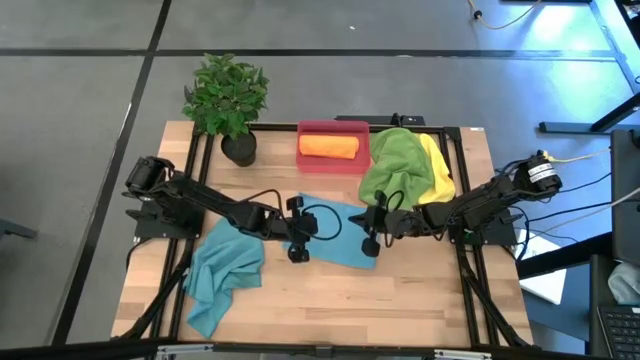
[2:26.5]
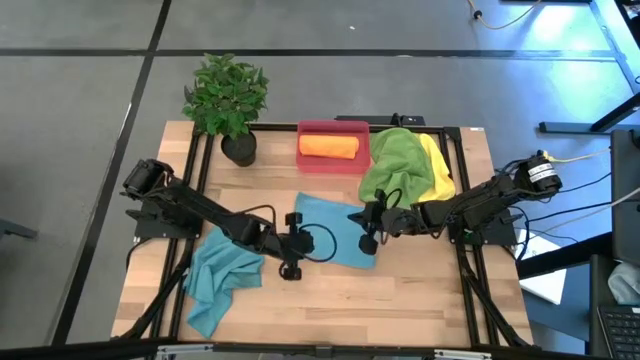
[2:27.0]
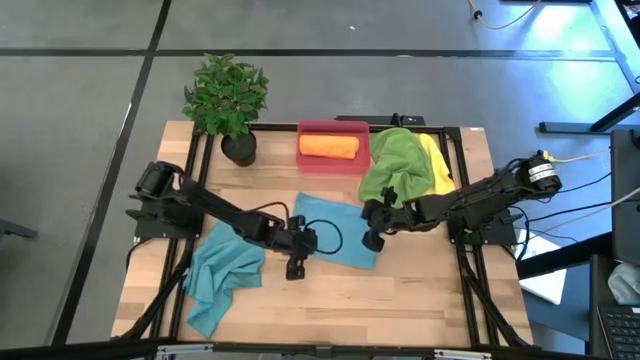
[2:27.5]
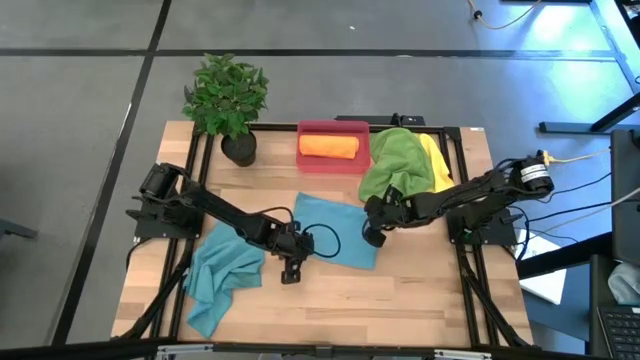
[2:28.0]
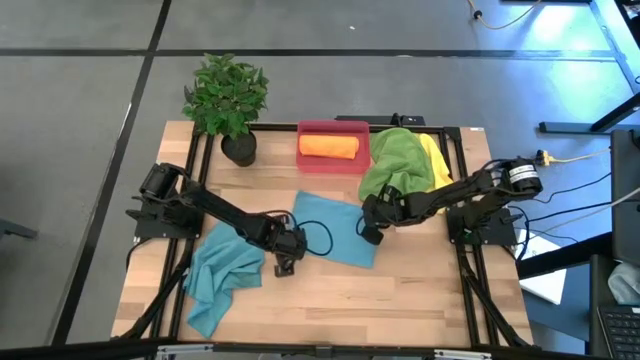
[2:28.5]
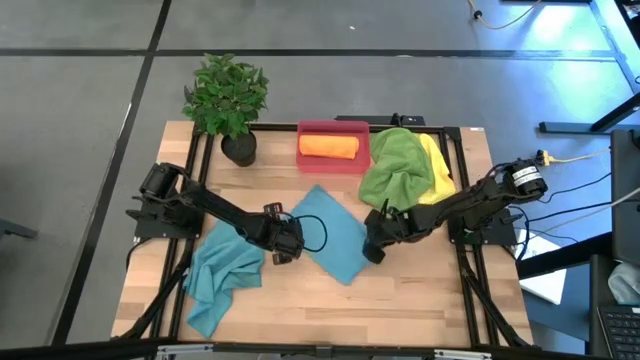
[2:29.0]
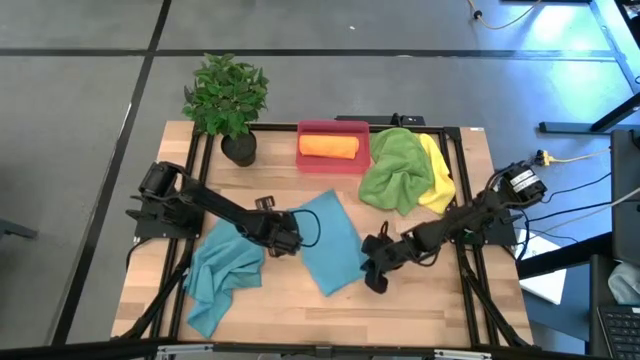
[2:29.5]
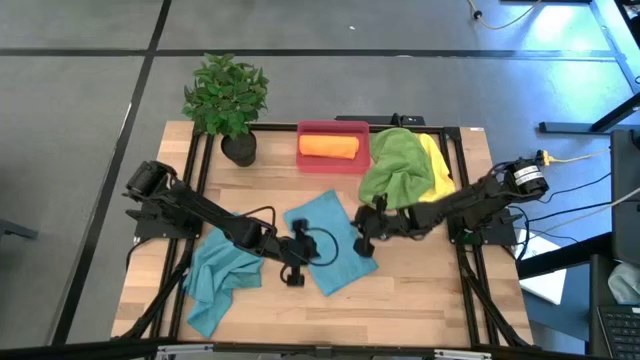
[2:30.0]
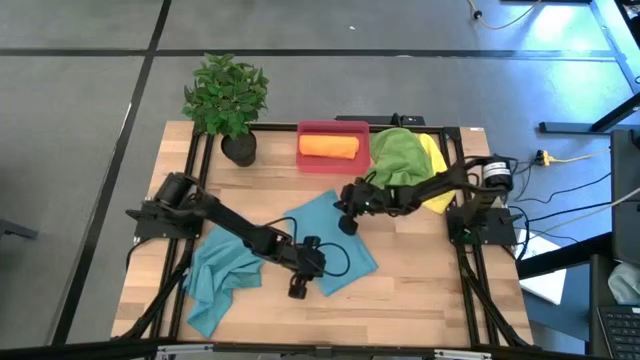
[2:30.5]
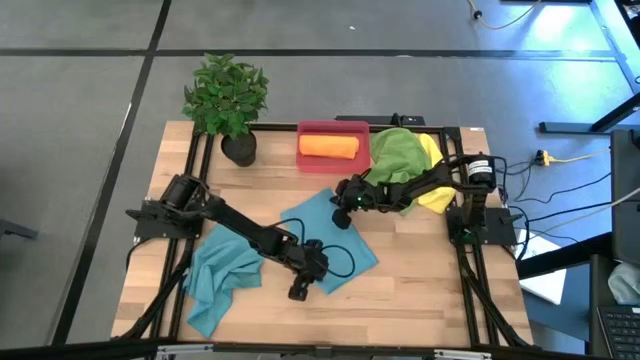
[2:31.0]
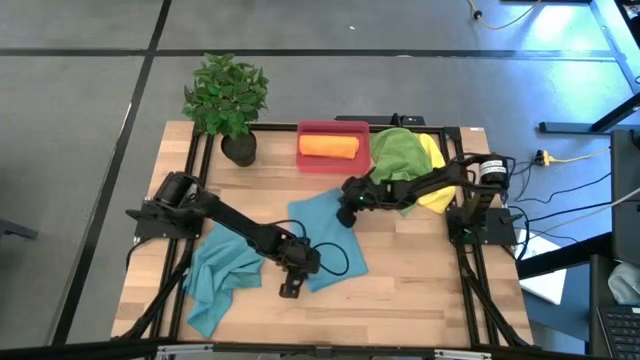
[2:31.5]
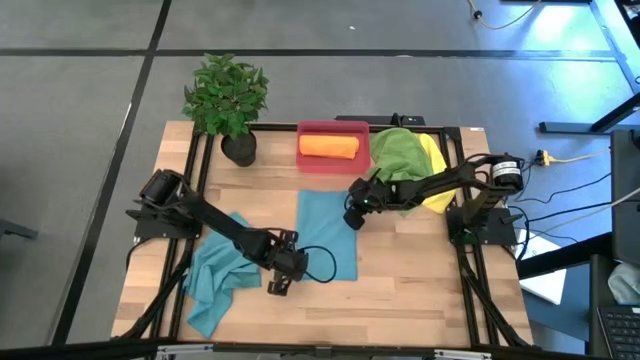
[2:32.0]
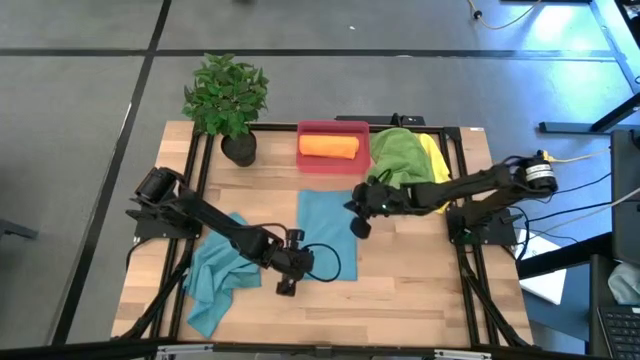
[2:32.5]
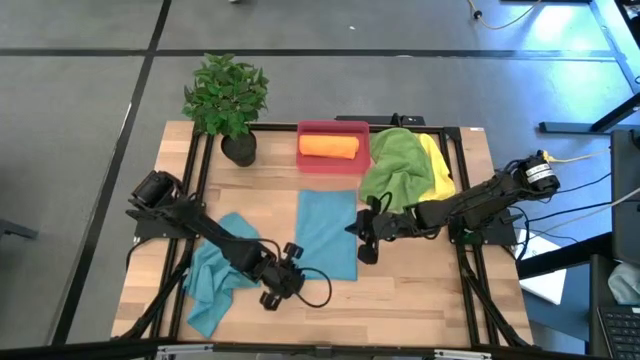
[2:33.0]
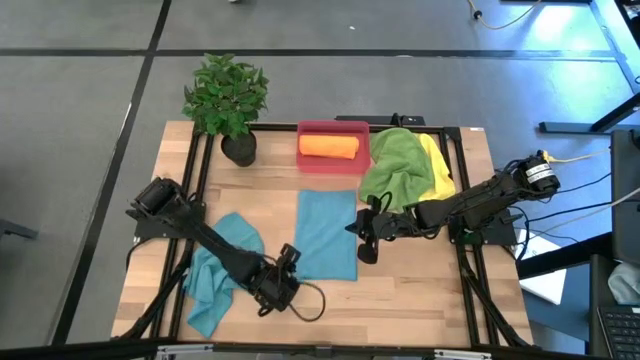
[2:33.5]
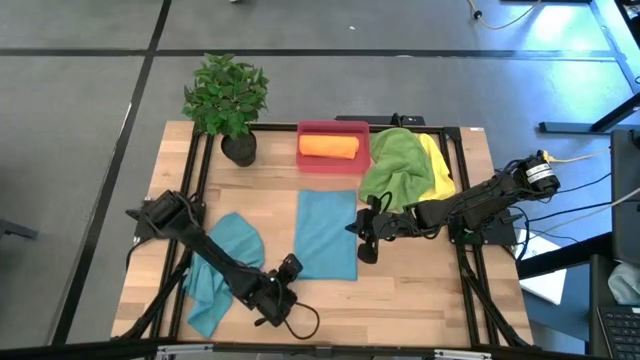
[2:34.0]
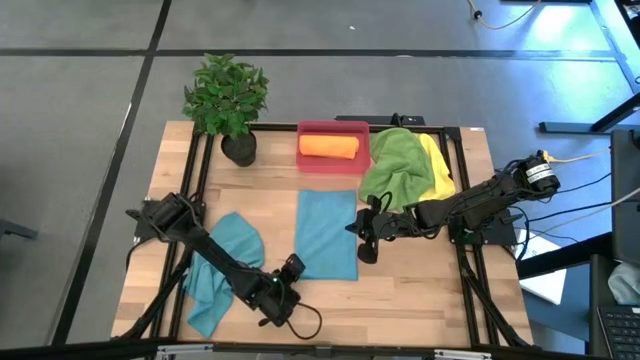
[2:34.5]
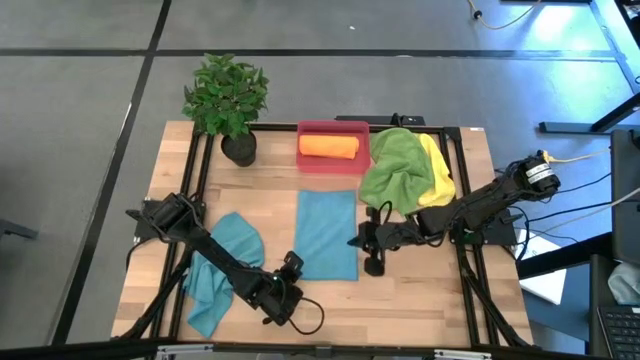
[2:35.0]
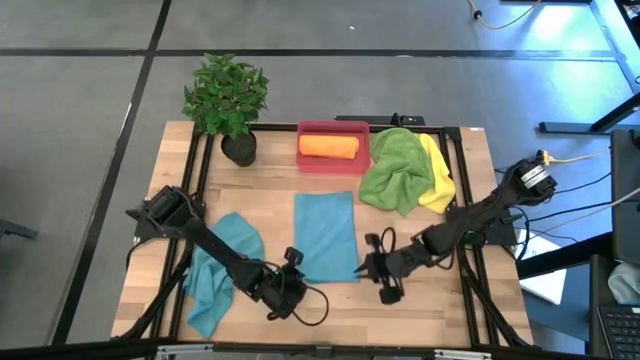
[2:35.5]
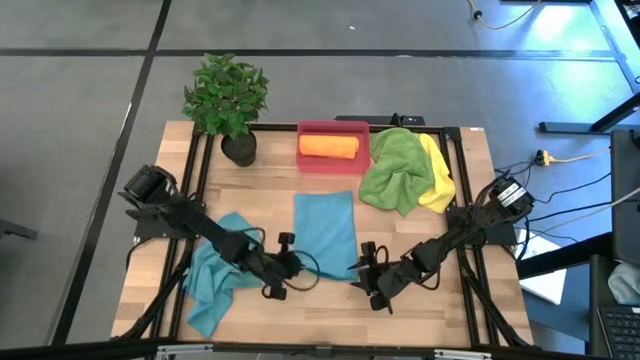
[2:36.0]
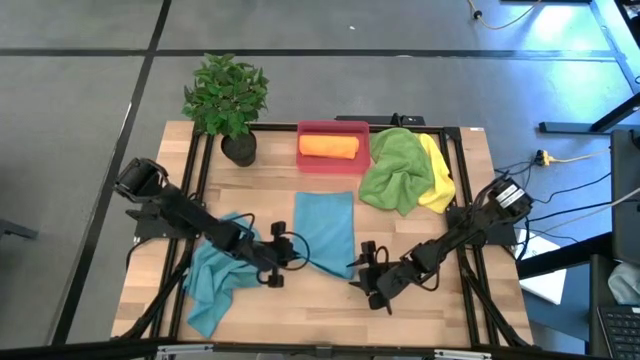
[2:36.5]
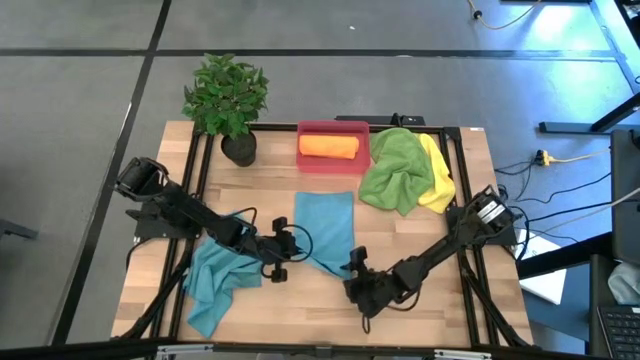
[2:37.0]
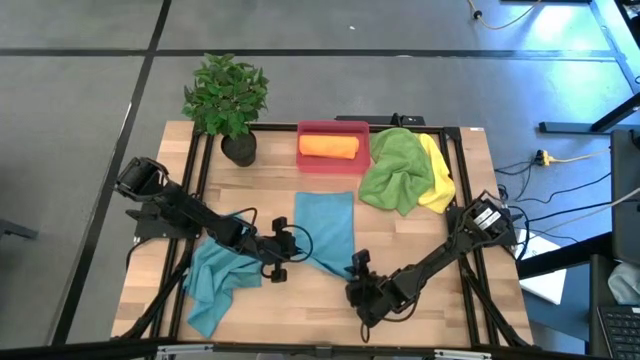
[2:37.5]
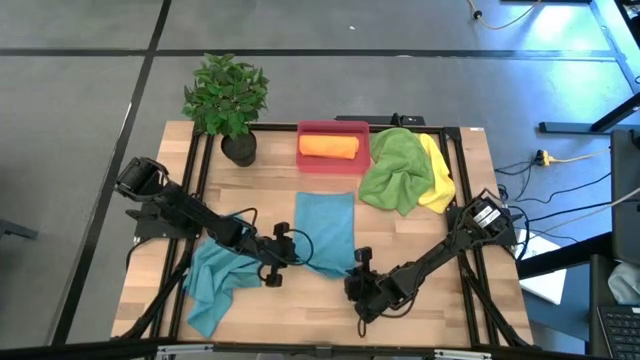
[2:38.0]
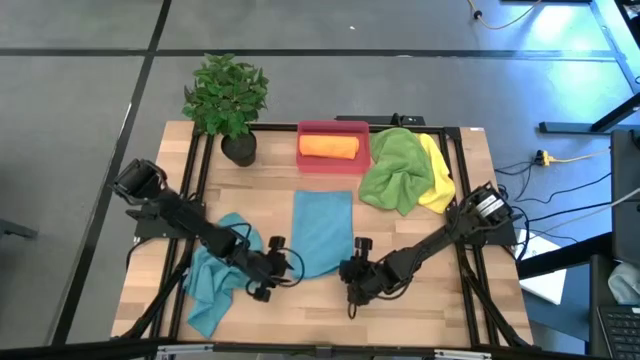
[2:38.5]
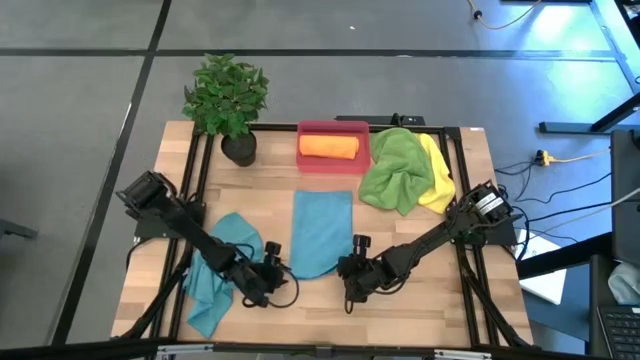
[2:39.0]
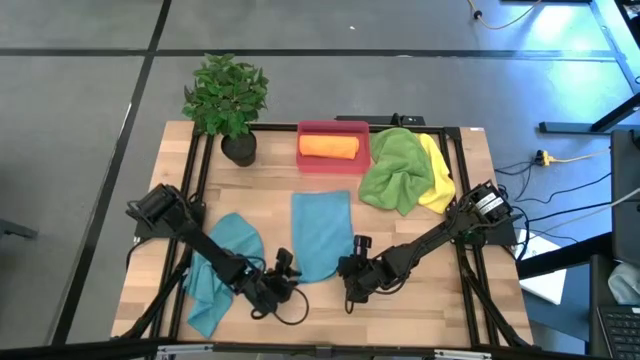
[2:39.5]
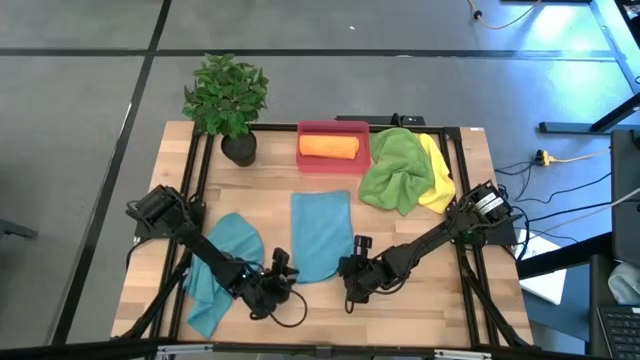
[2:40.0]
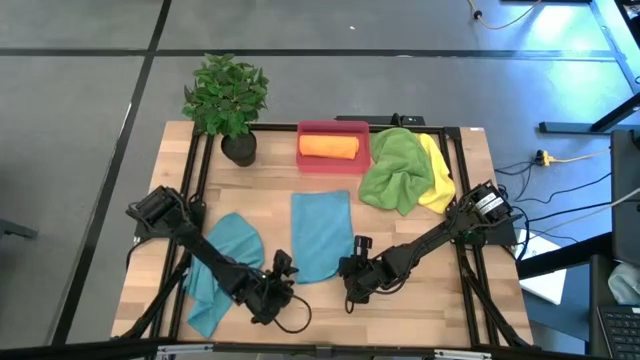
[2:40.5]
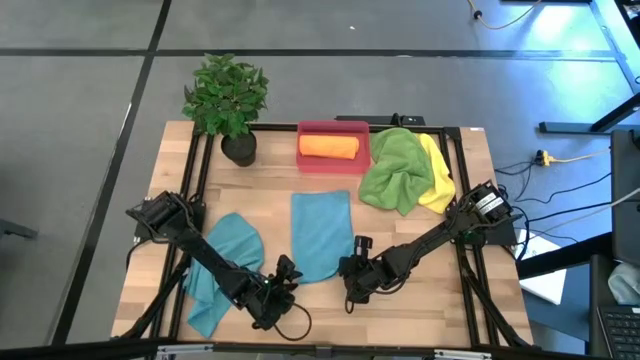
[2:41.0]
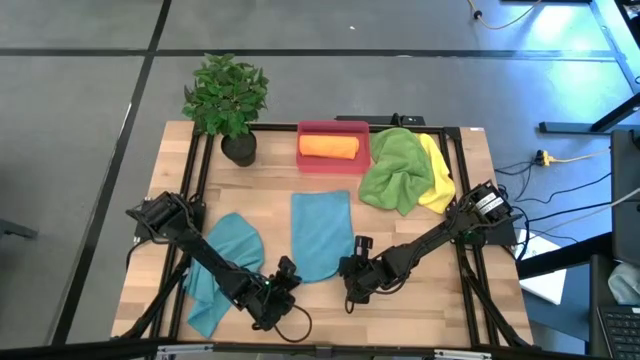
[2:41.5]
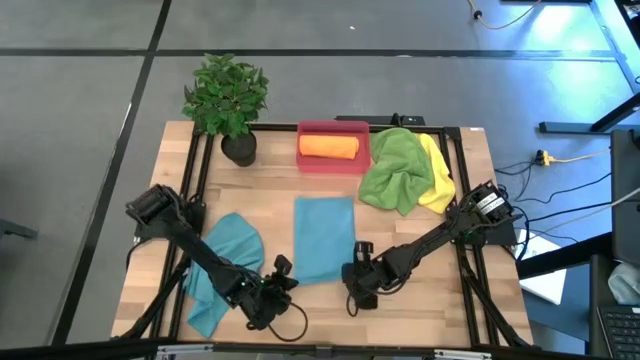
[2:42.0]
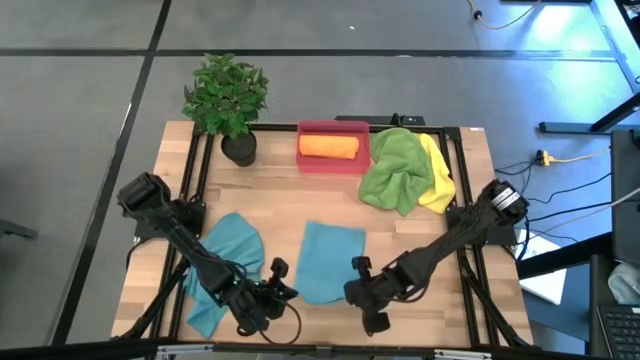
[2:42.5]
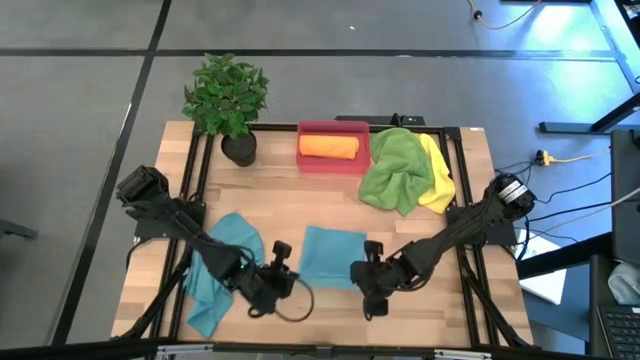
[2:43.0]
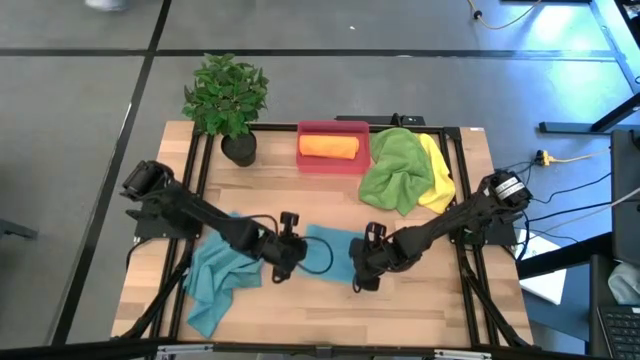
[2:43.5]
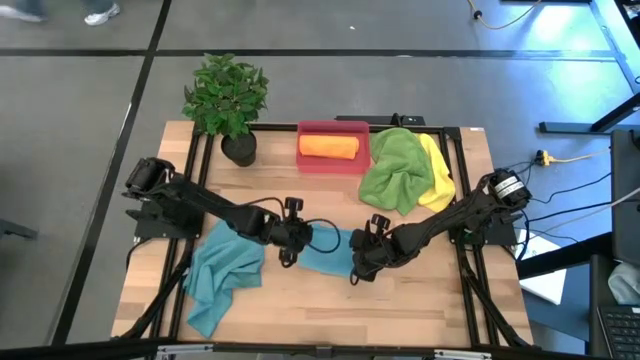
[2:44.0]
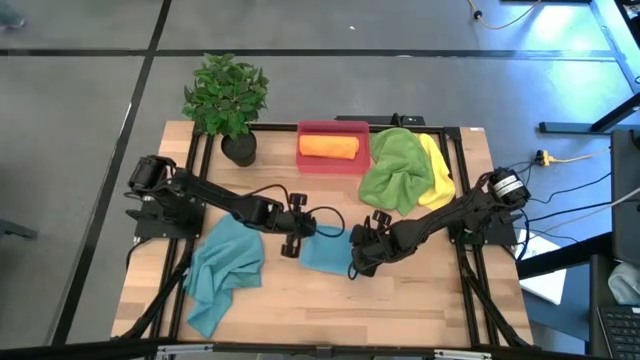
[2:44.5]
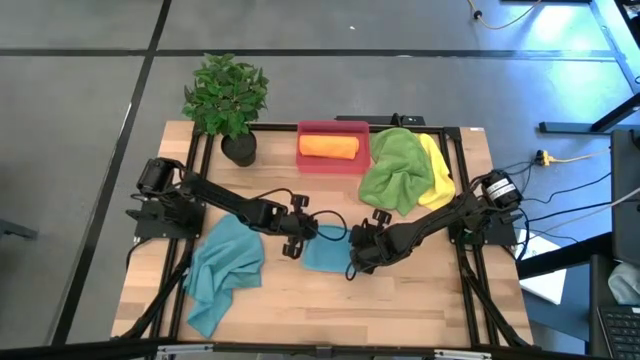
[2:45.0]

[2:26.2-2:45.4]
Task: Roll microfiber towels into tight, uniform cylinder then place into a basket
Fold the right blue towel

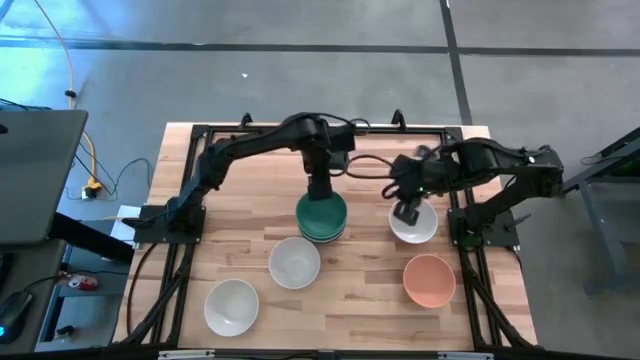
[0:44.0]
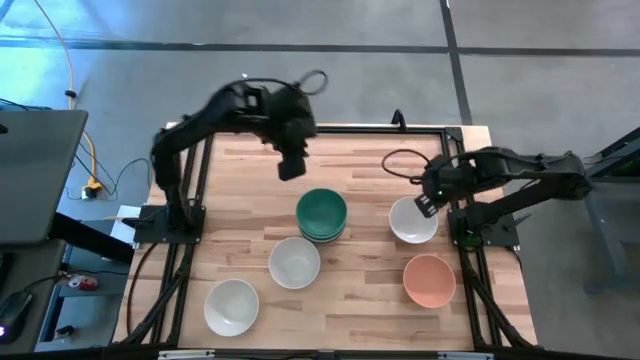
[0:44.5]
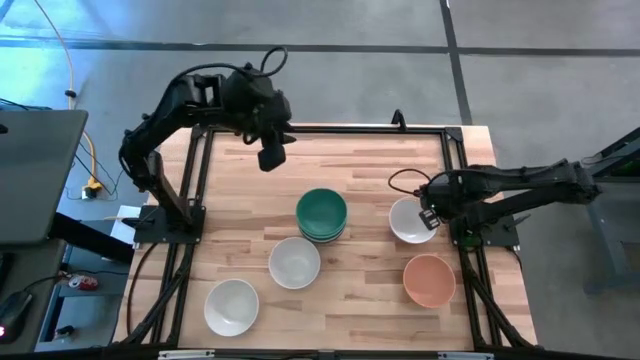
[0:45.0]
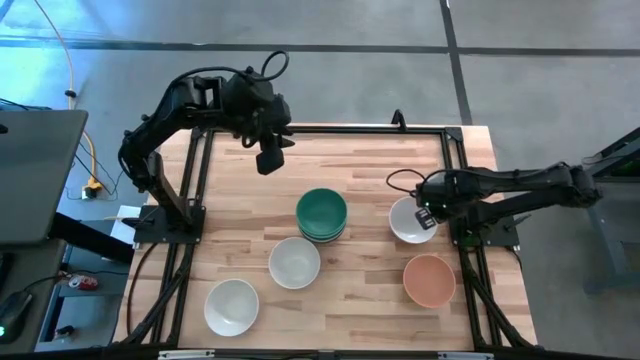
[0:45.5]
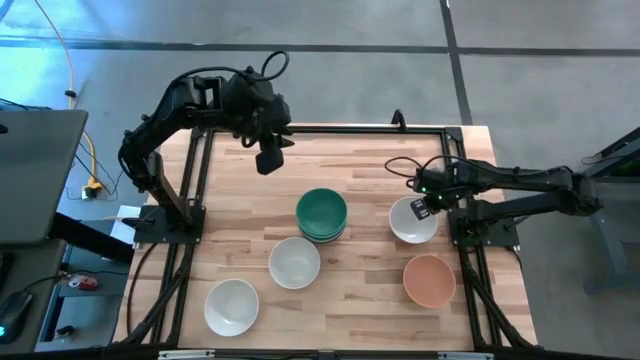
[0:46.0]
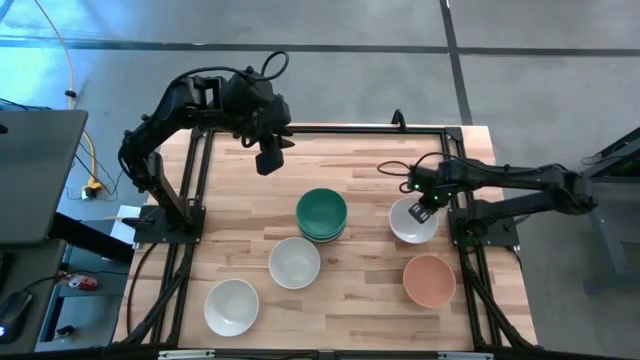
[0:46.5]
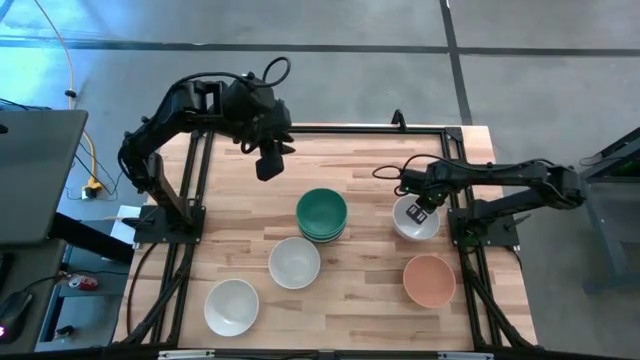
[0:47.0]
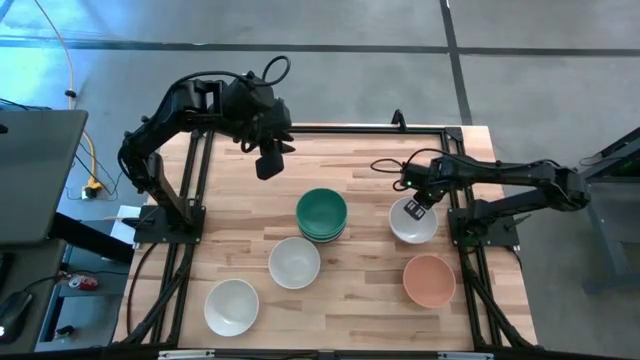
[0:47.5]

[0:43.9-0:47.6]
Task: Nest bowls inside each other
Stack the top right white bowl on top of the green bowl
